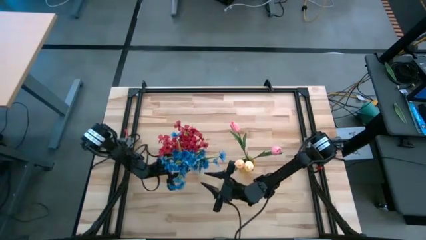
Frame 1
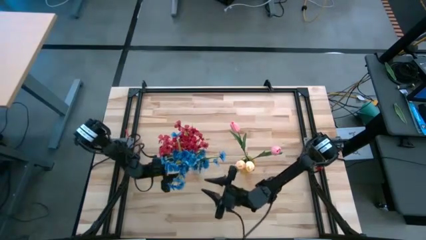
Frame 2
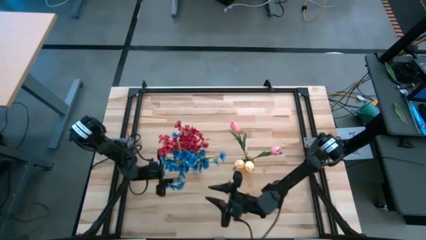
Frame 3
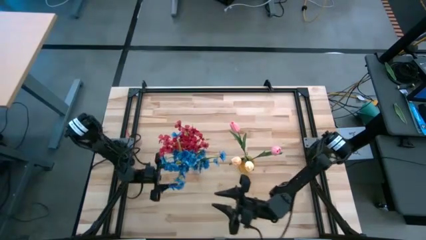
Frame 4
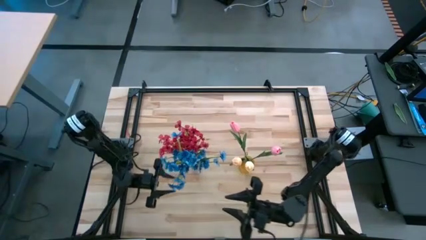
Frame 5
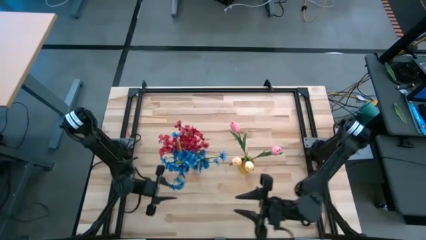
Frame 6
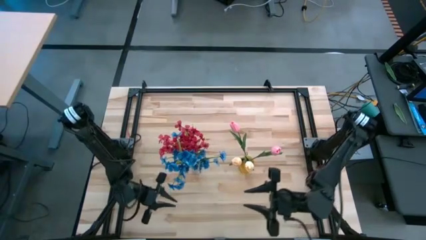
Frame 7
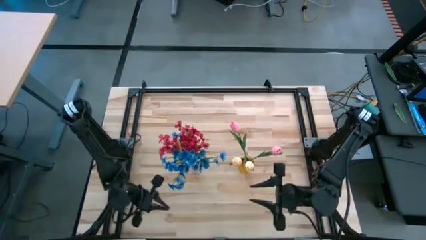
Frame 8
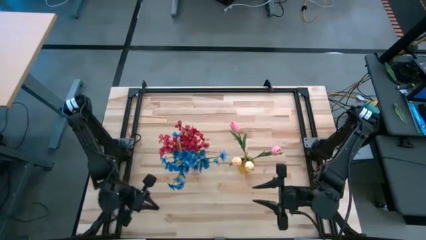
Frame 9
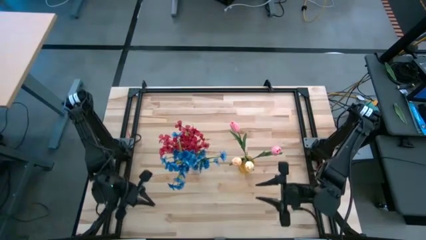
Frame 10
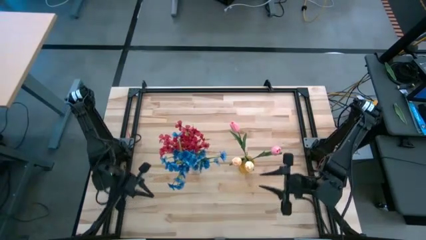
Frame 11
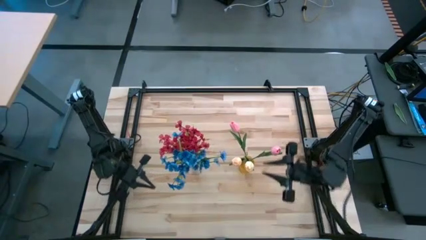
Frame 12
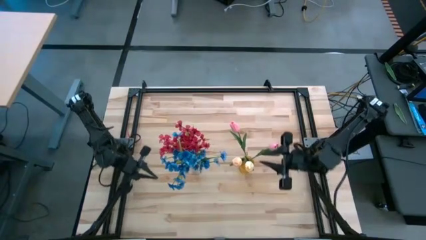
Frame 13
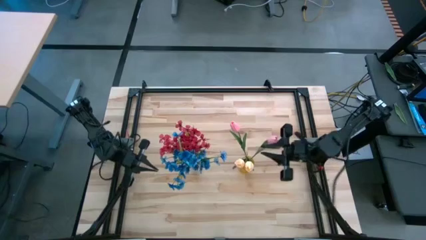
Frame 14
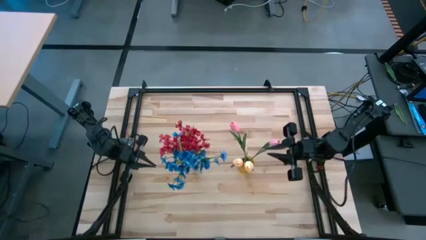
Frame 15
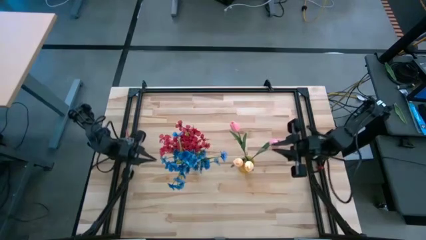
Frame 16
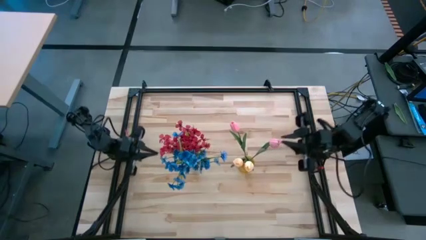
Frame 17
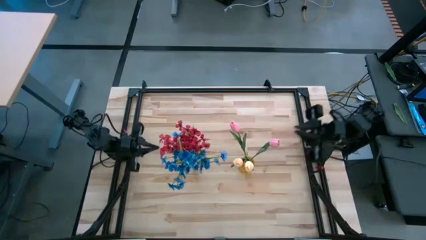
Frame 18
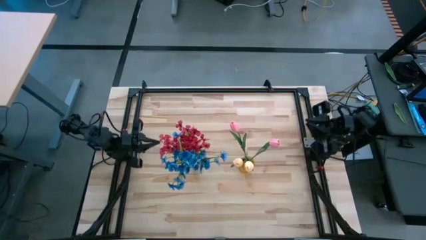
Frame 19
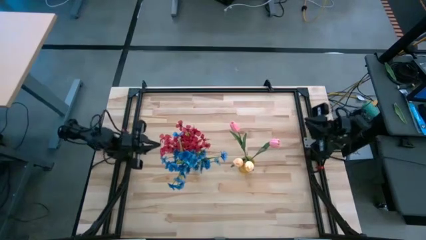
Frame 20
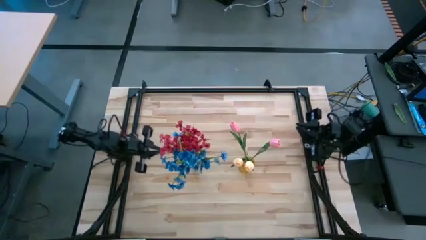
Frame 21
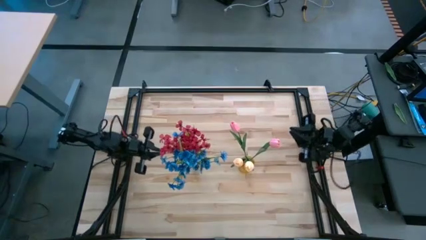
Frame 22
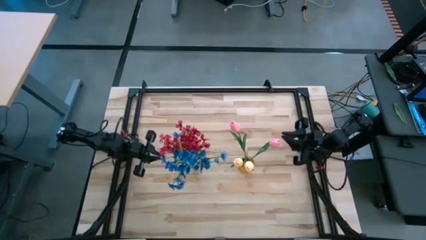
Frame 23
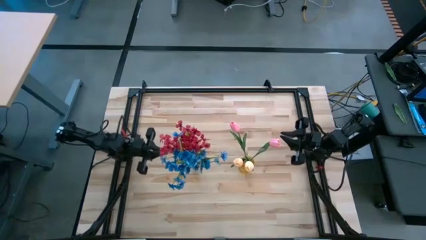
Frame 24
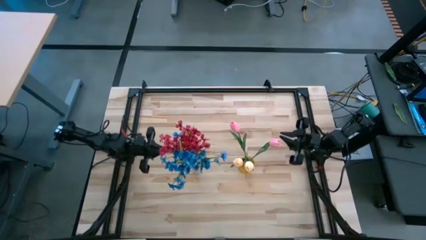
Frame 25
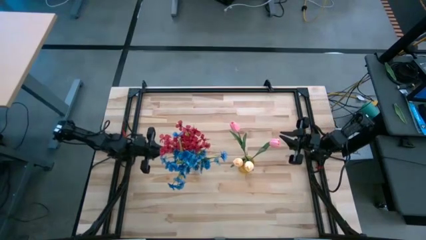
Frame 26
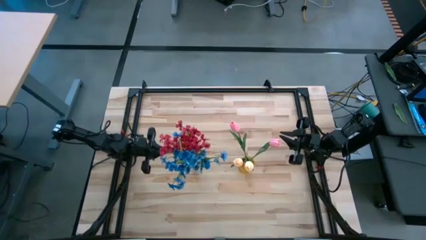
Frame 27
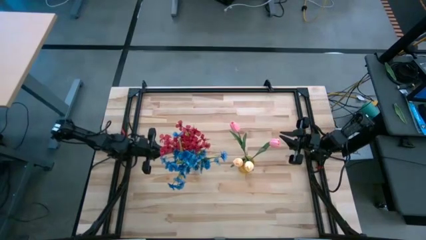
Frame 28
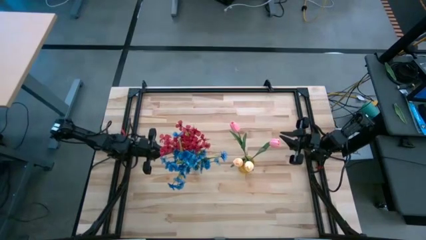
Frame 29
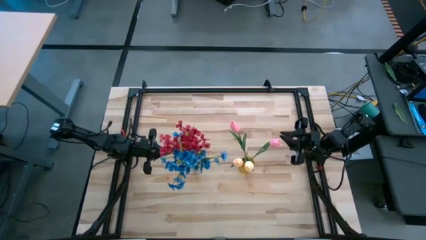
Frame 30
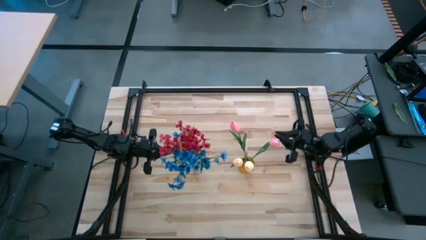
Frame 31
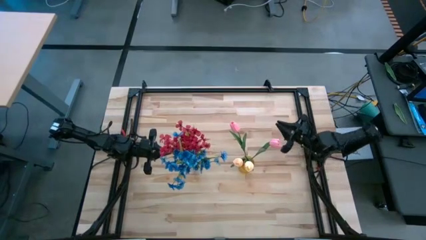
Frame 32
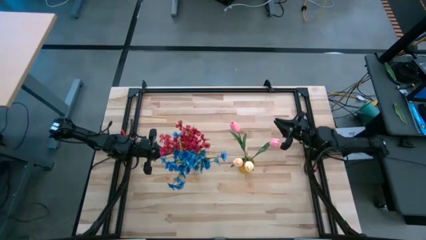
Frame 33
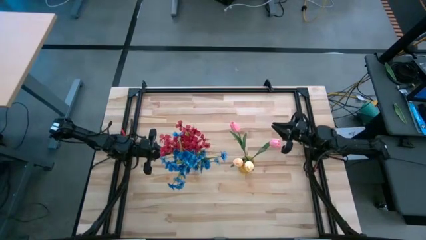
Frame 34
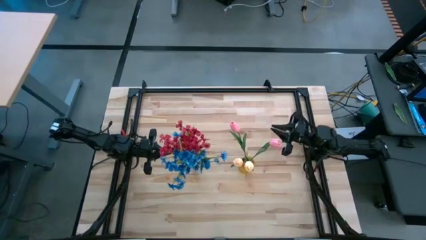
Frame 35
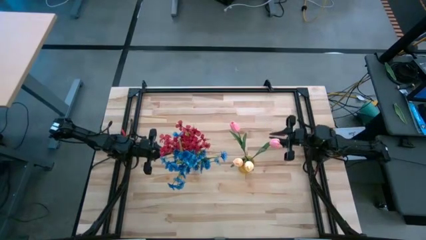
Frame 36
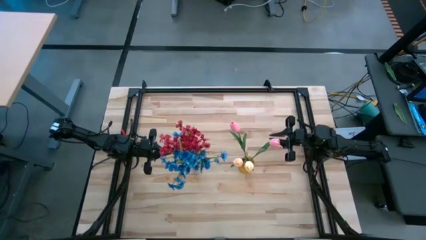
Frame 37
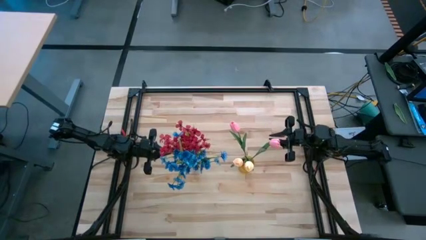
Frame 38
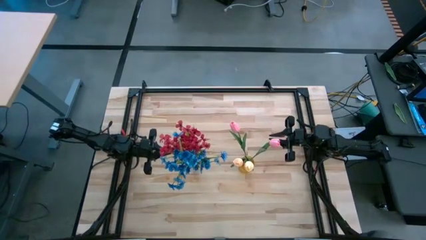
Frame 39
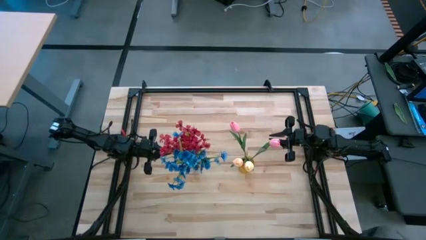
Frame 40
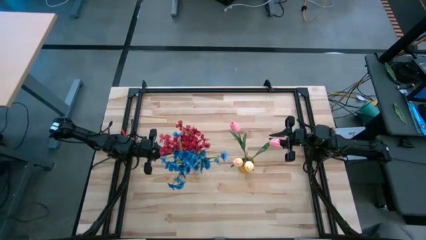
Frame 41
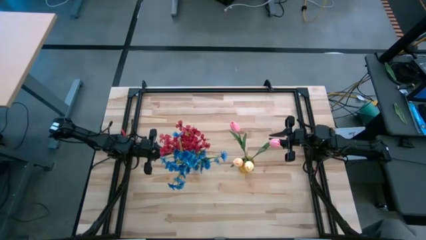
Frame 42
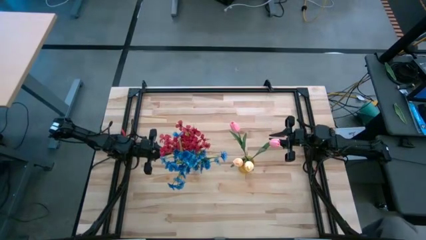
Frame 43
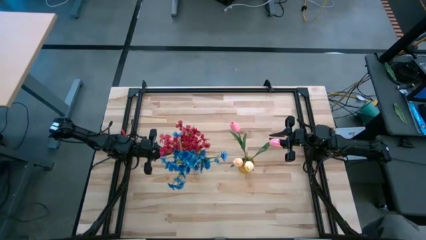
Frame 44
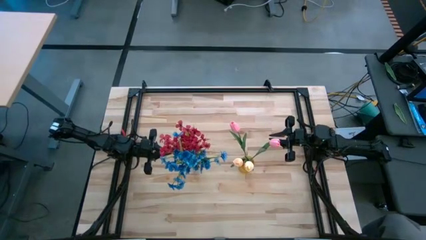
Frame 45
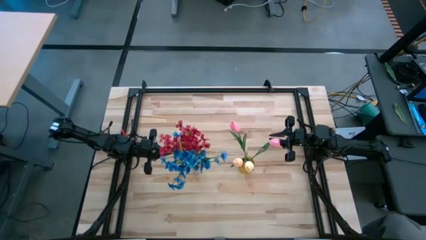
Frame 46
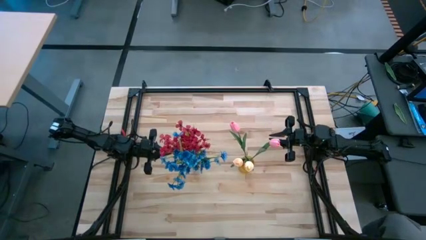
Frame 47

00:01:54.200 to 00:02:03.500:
Task: Sort flowers into vase by color
Return to Home Position

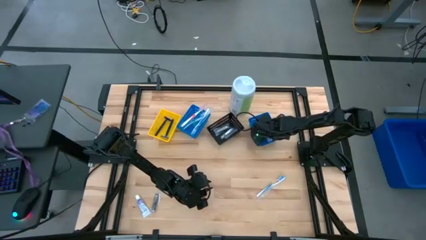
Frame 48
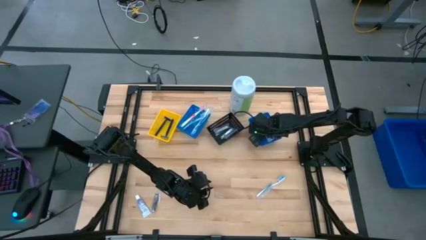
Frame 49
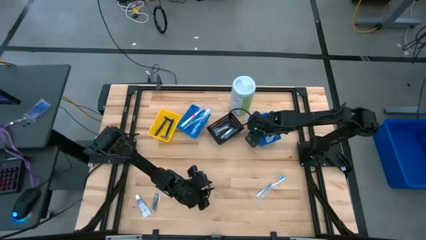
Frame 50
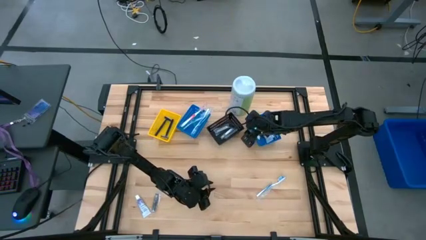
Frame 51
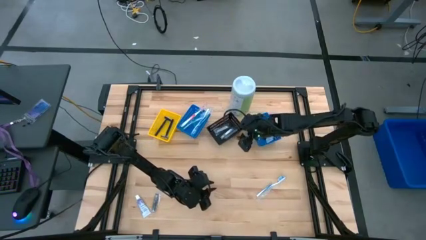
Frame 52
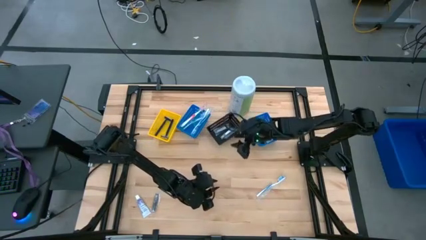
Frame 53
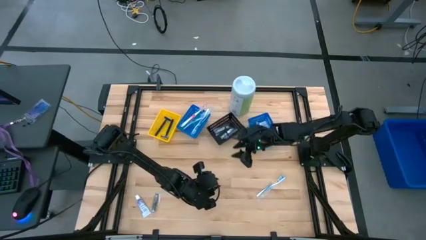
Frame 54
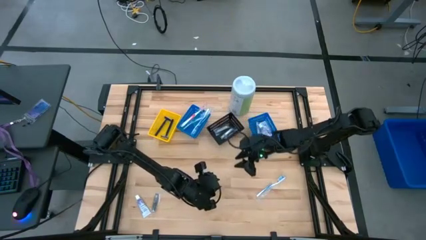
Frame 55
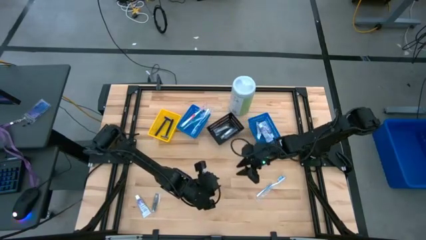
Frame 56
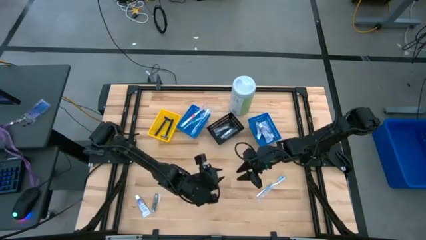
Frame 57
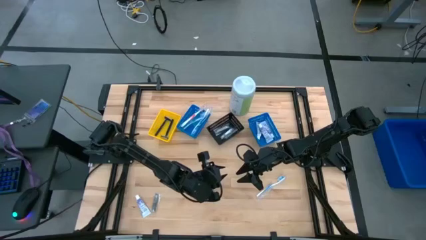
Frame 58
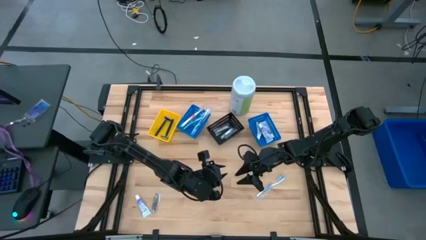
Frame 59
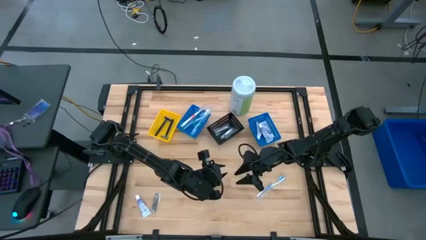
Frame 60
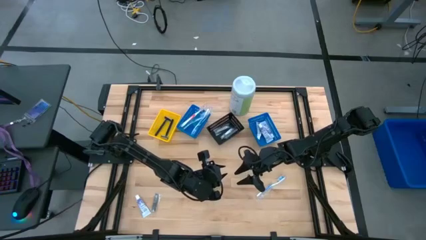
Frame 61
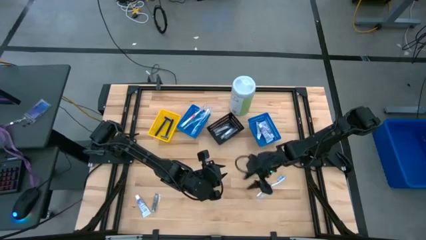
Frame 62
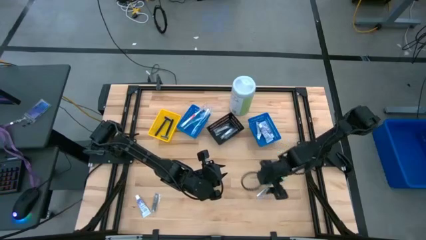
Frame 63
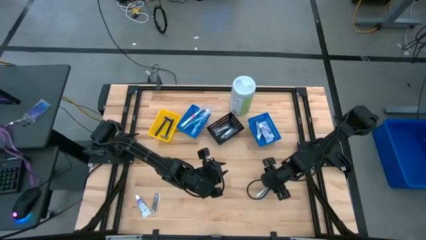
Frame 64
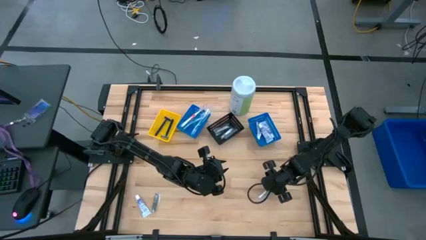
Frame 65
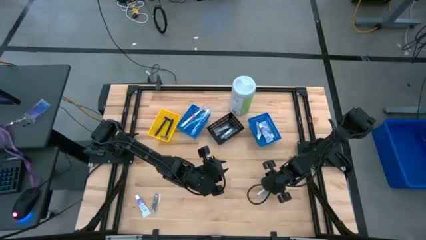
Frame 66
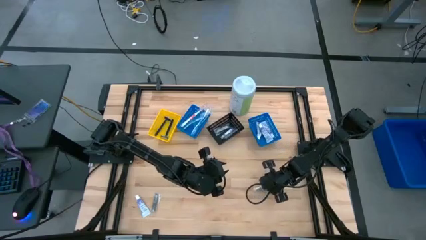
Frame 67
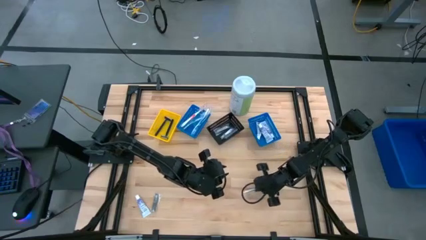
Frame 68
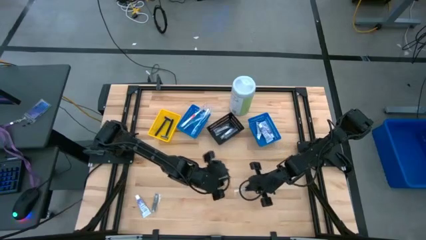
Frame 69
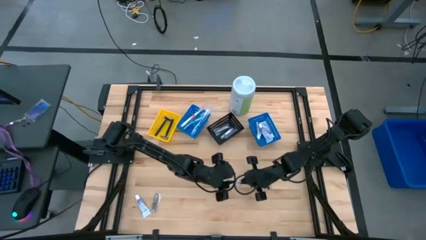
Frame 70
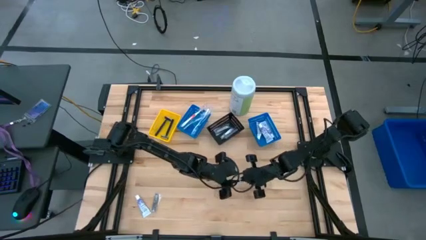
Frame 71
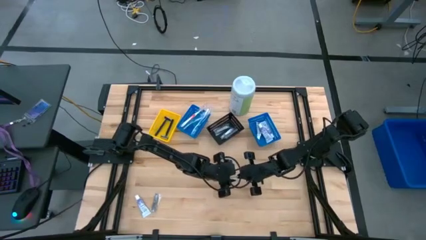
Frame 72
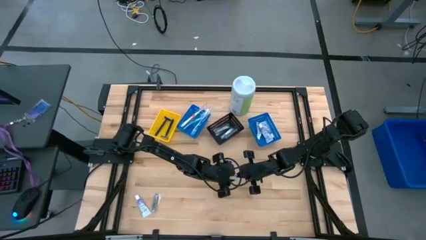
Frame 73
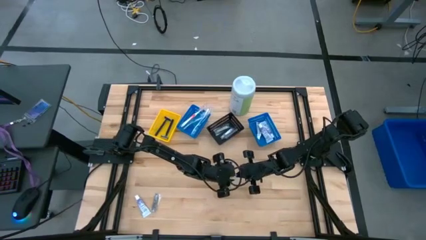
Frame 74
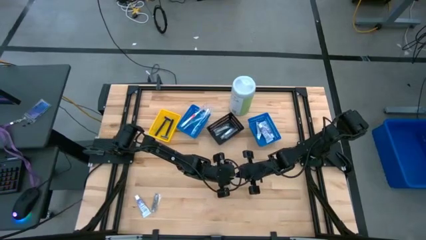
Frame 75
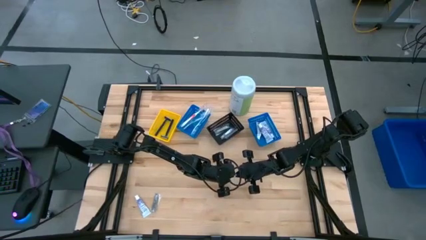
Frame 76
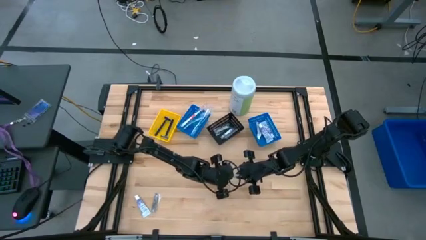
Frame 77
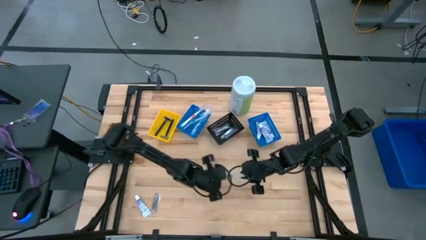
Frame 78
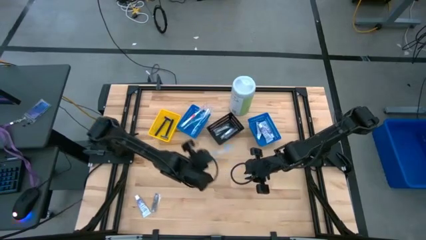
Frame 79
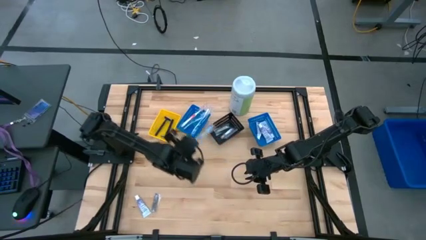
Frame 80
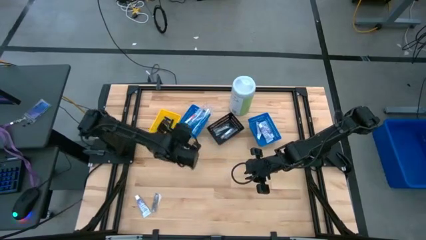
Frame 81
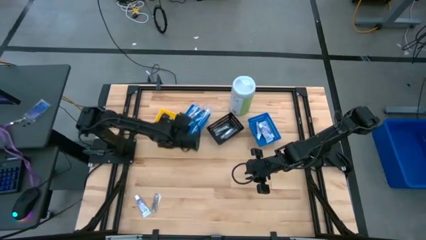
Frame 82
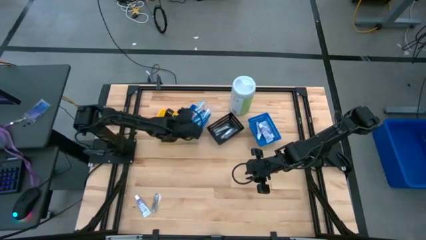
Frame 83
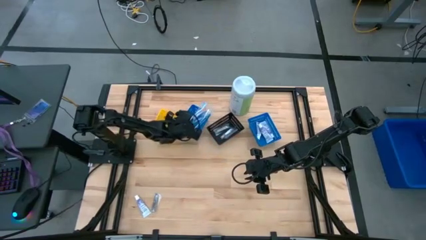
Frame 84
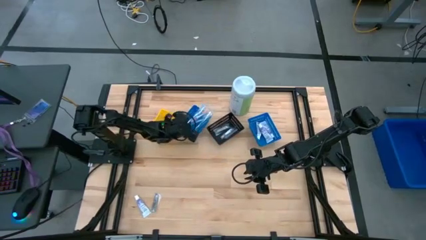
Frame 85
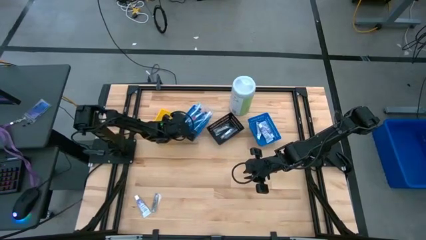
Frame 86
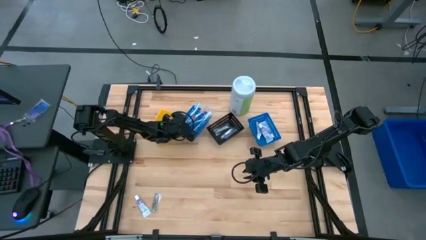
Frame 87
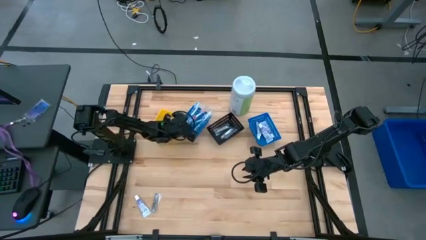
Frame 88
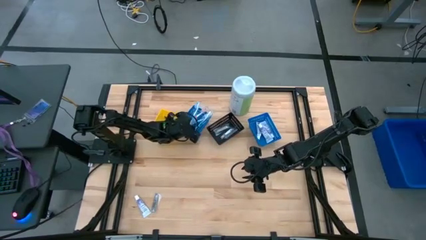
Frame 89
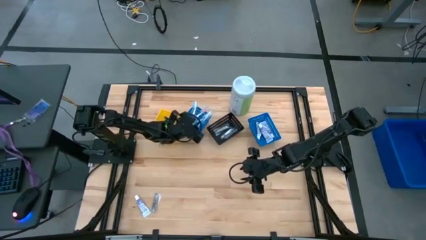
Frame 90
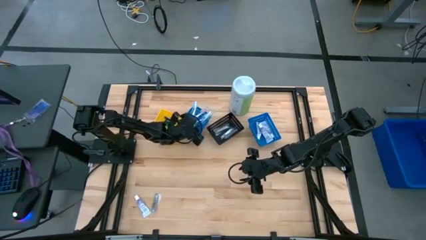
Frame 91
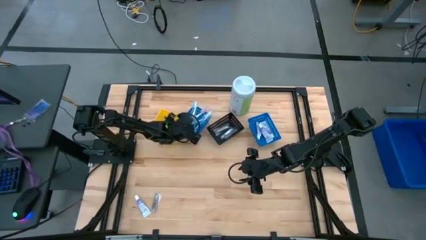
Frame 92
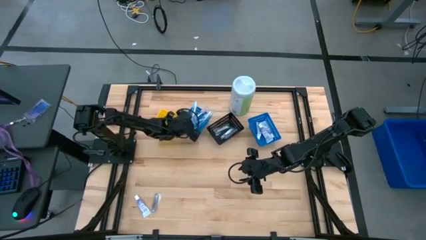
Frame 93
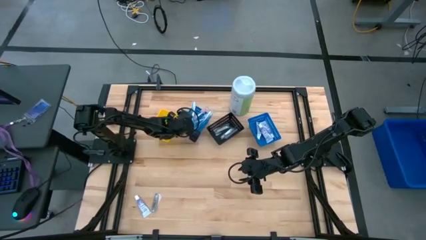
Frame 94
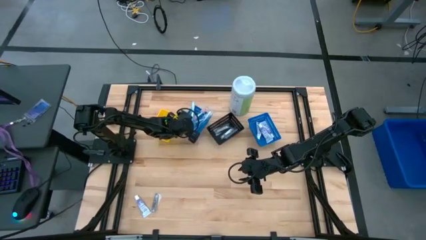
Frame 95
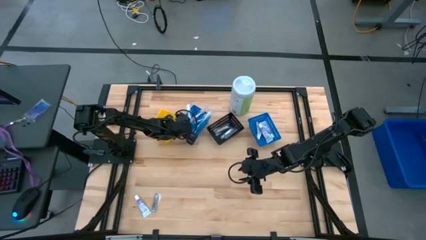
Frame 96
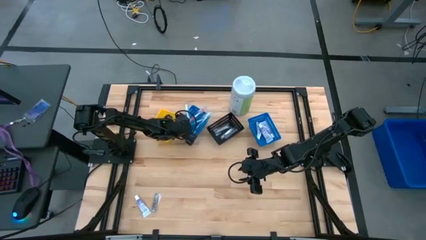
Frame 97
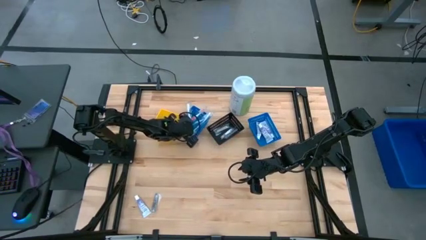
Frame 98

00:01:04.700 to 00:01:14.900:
Task: Pick & Place Travel size toiletries
Put the blue toothbrush into the left blue basket
